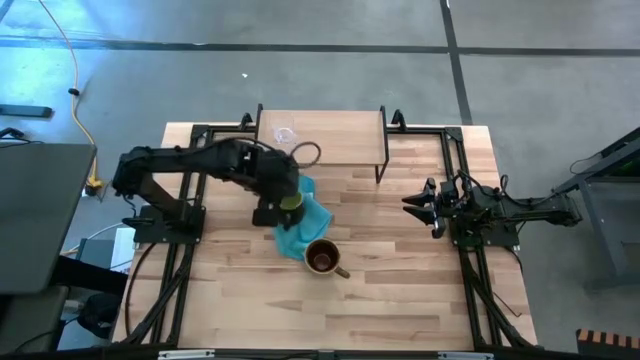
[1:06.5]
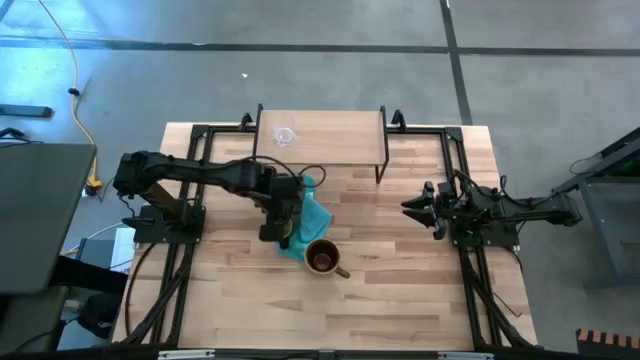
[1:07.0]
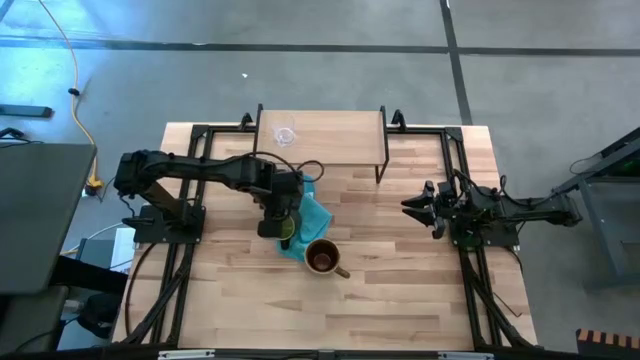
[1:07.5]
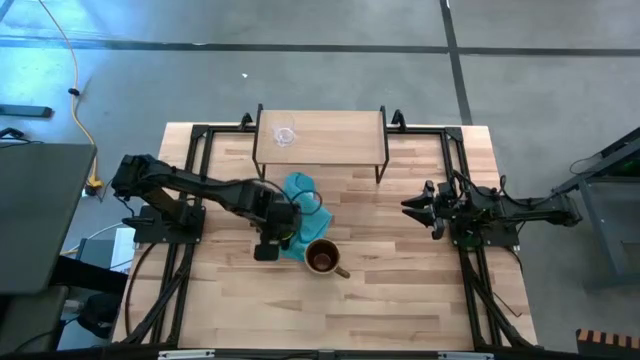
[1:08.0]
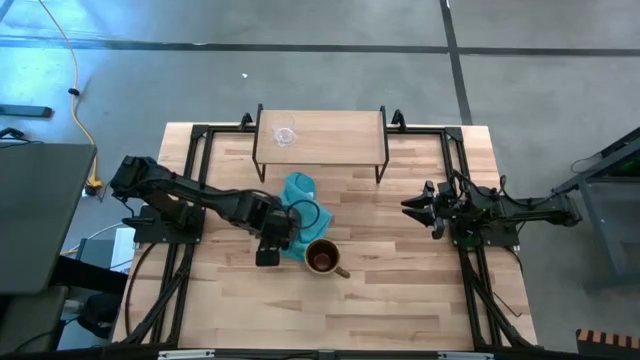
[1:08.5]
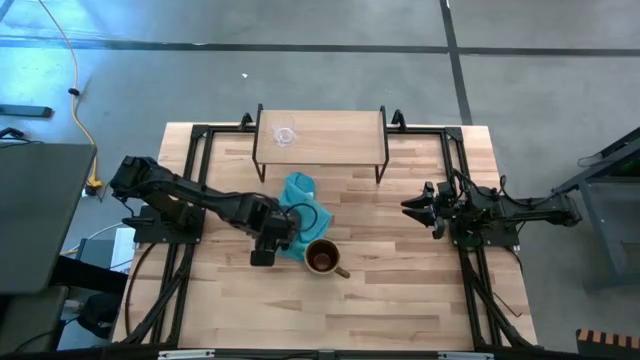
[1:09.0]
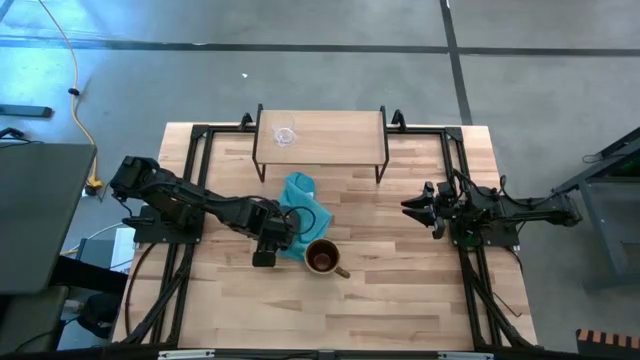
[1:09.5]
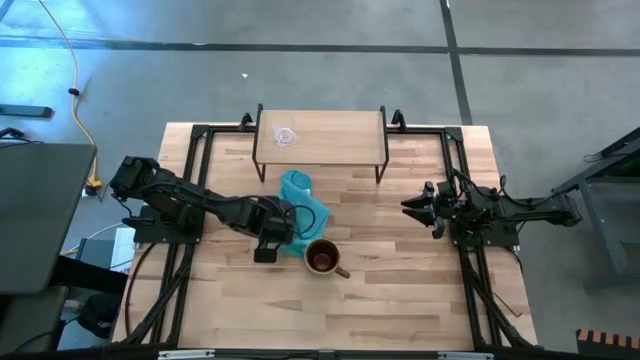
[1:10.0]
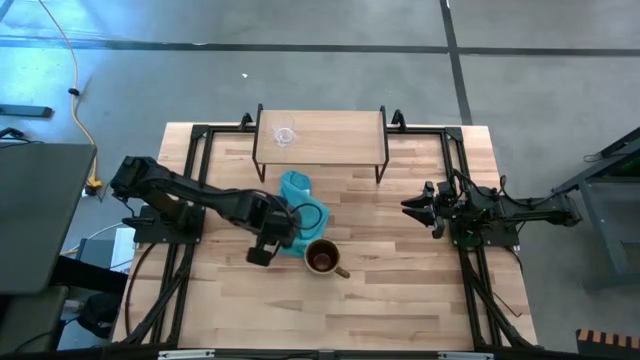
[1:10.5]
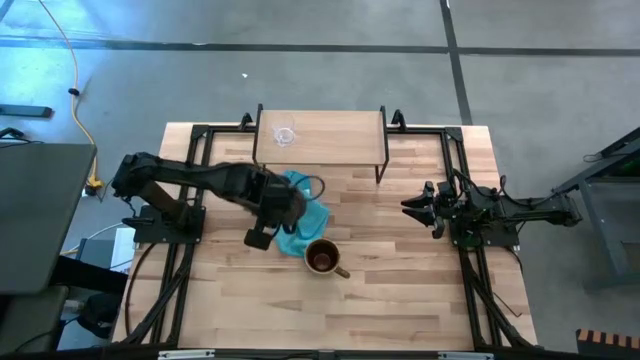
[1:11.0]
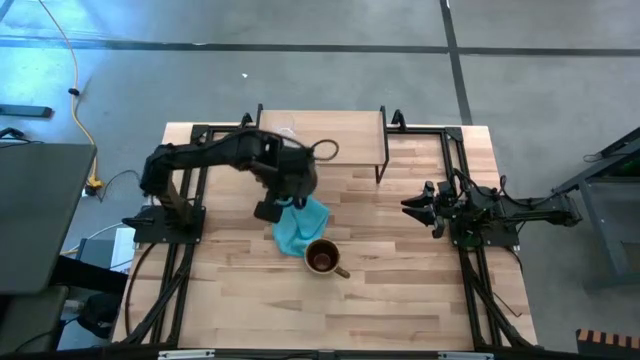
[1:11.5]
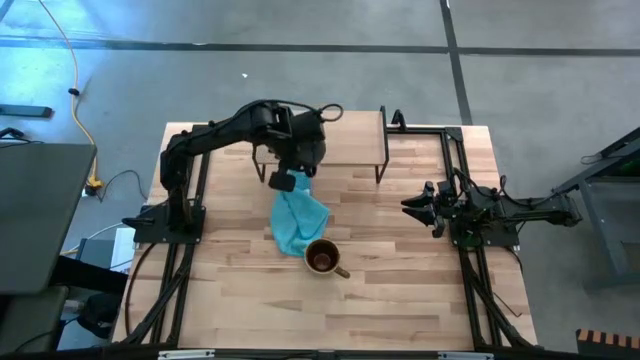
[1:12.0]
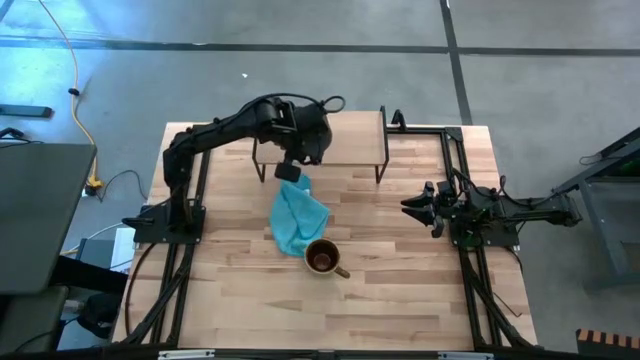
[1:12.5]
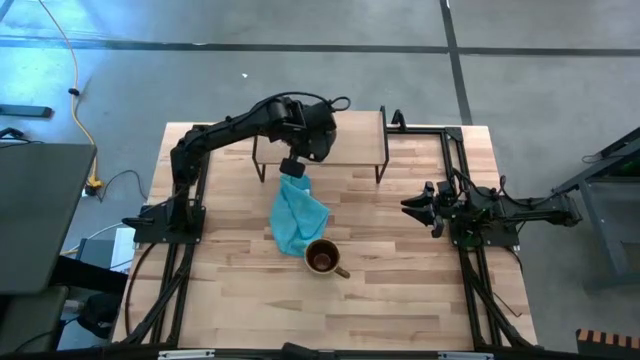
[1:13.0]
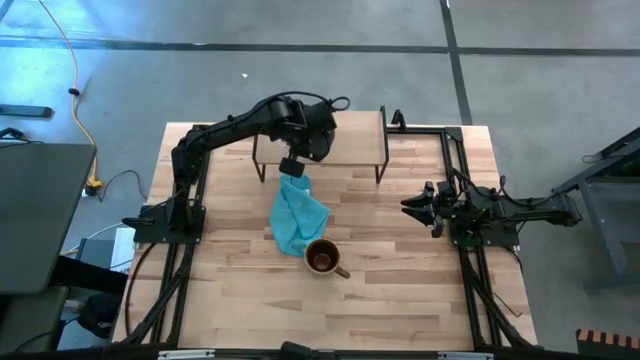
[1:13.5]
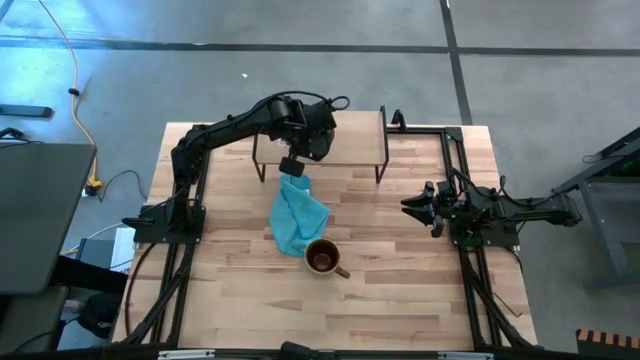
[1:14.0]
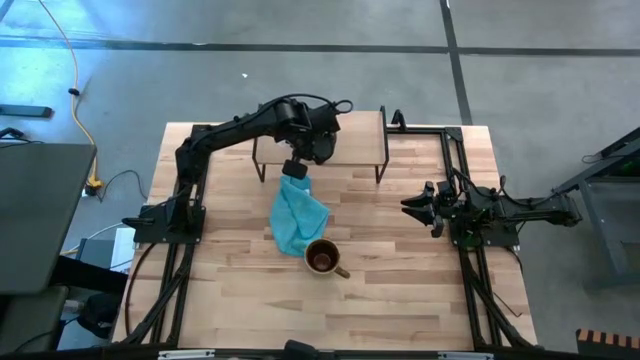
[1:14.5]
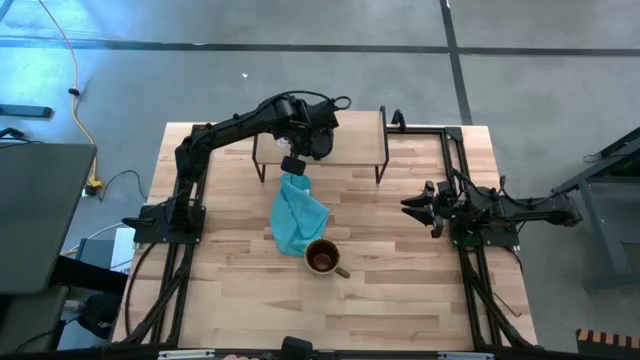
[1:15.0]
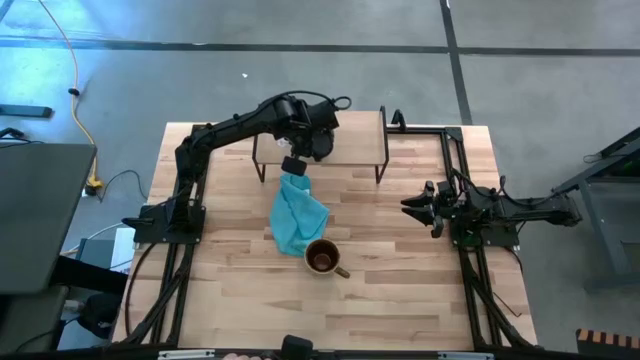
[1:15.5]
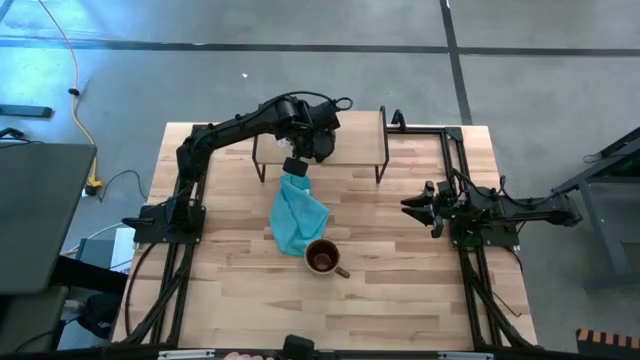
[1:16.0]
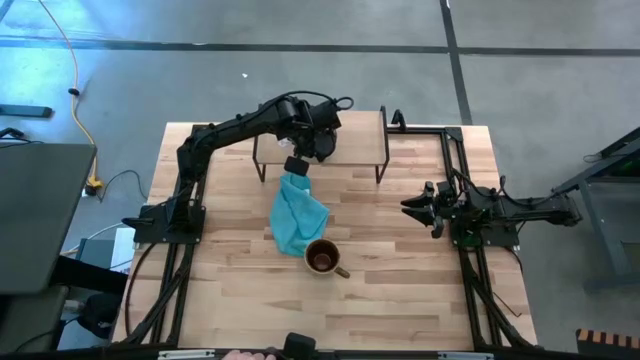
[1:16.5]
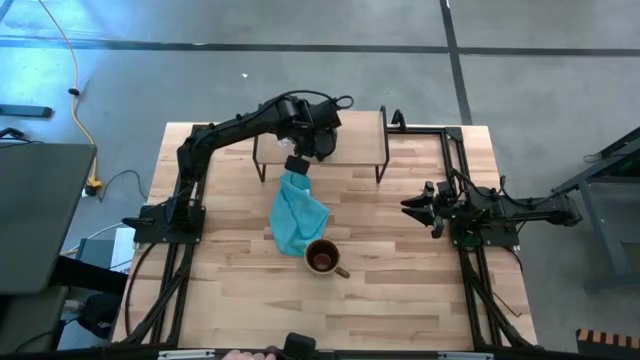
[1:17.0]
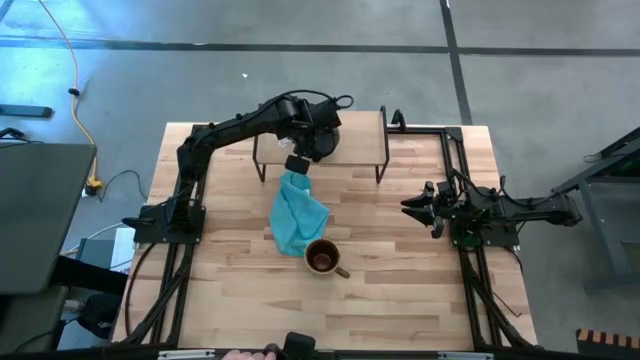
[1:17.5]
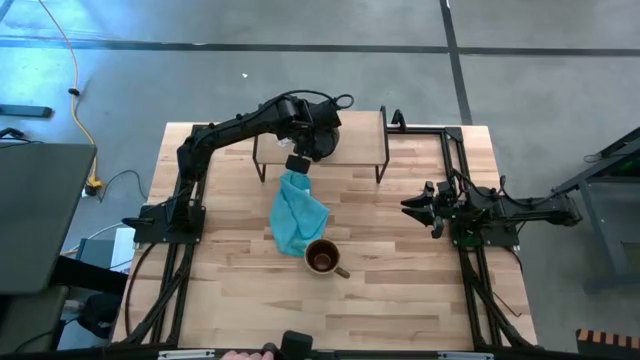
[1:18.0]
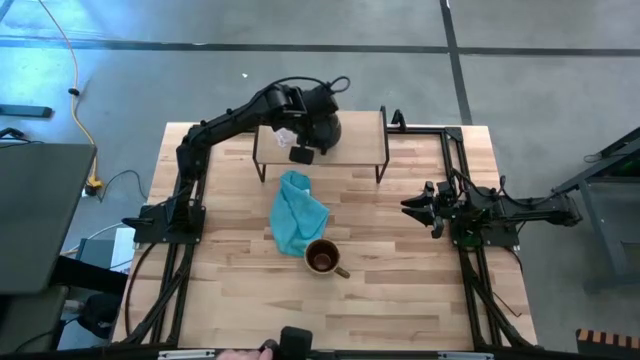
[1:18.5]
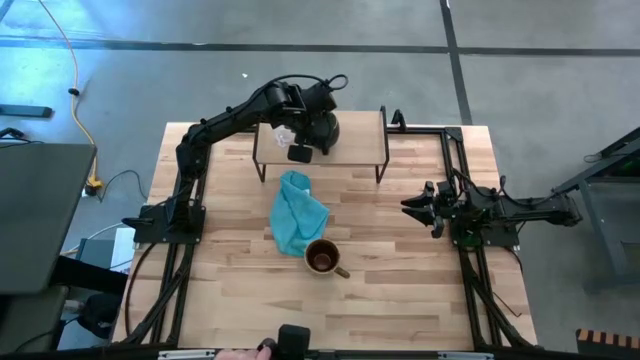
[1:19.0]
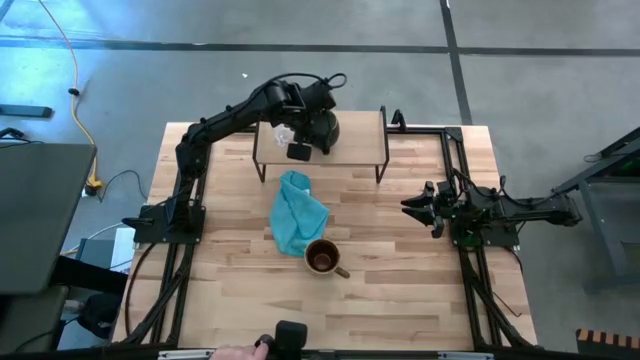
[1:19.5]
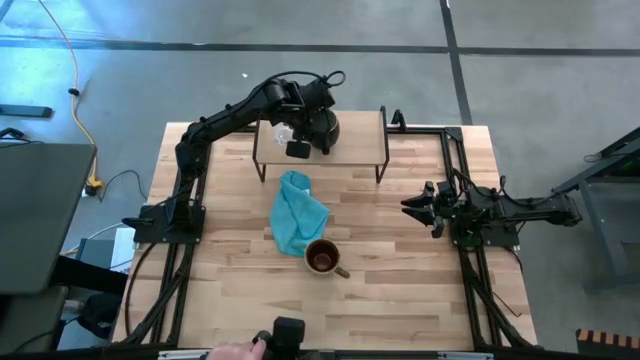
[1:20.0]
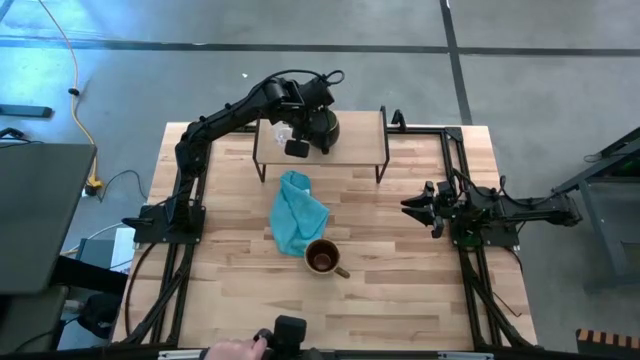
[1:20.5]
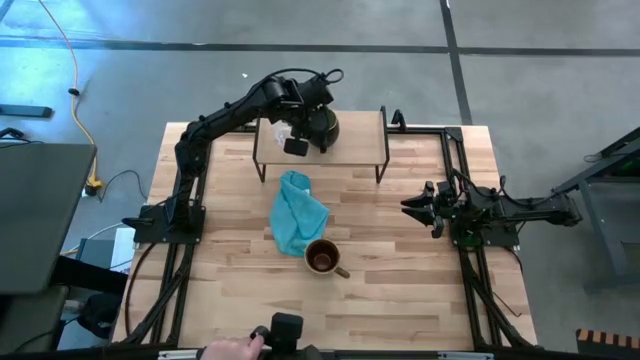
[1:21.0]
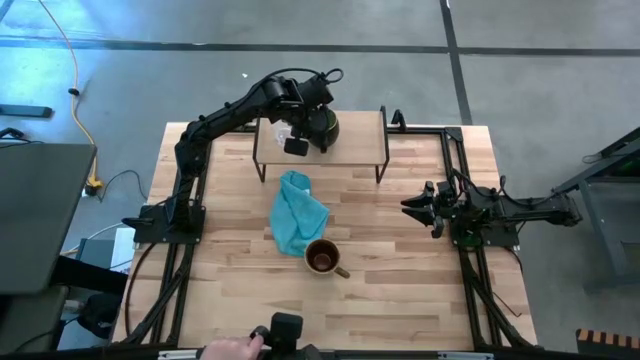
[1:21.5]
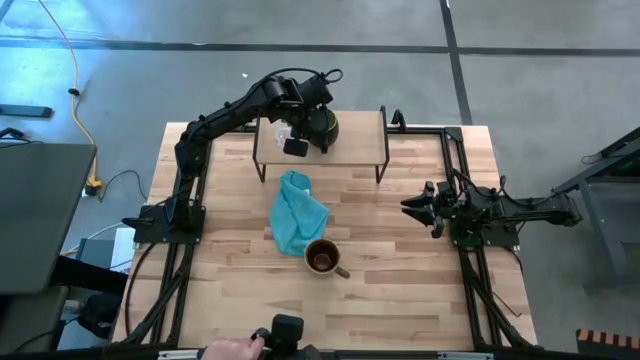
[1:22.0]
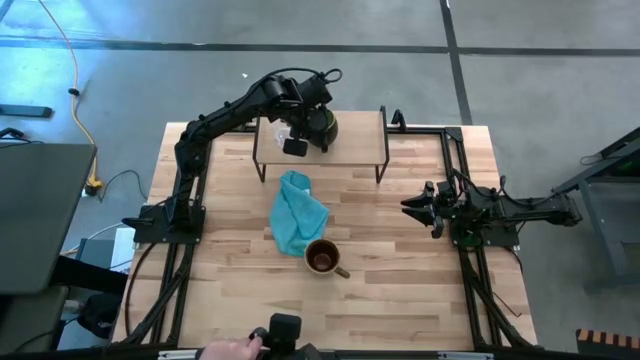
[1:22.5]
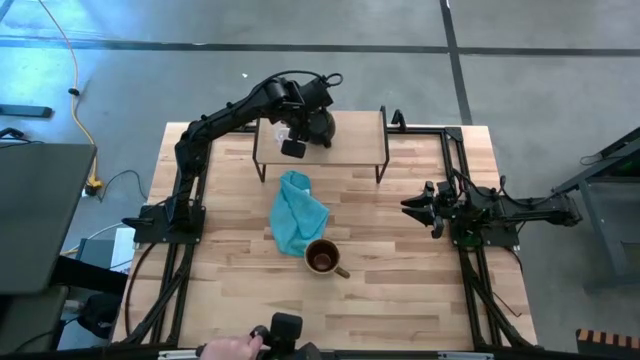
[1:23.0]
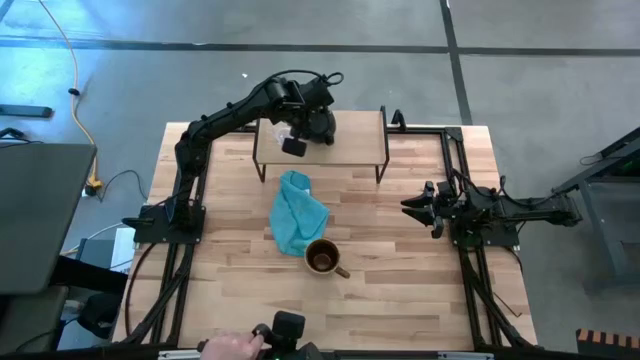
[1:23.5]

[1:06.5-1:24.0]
Task: Stack small to large cups/mugs on shelf
Put the green mug on the shelf

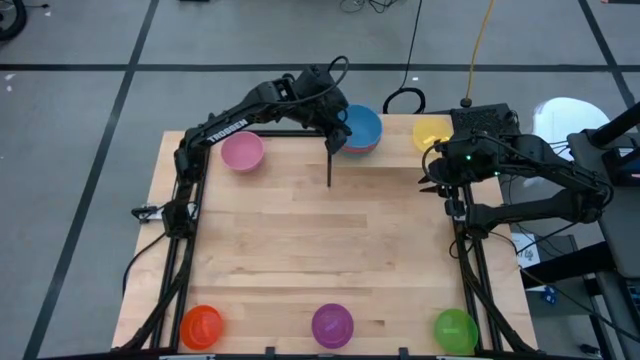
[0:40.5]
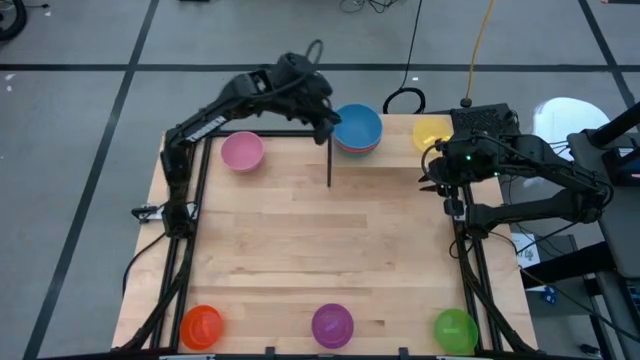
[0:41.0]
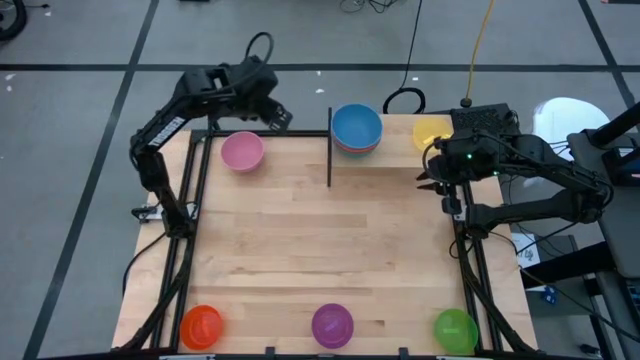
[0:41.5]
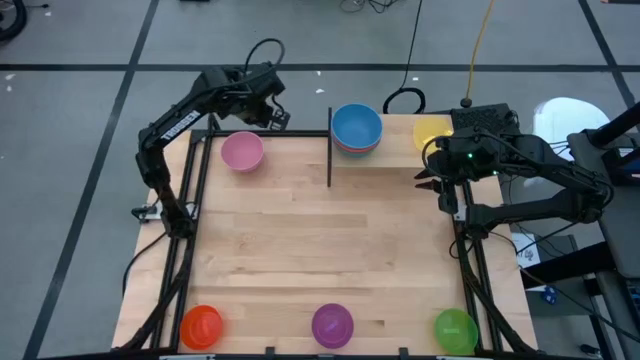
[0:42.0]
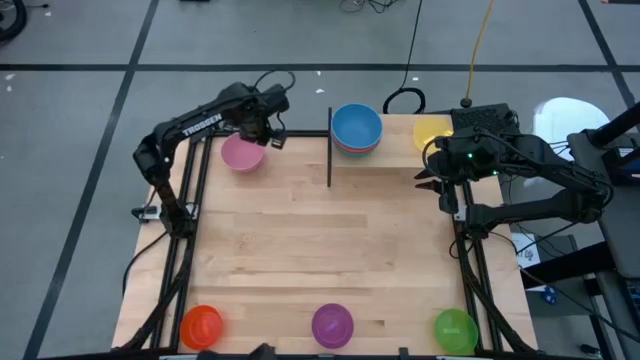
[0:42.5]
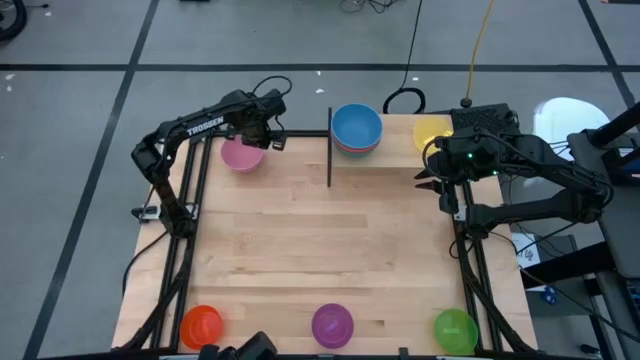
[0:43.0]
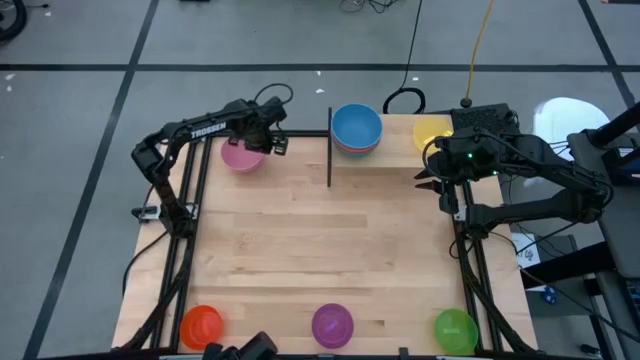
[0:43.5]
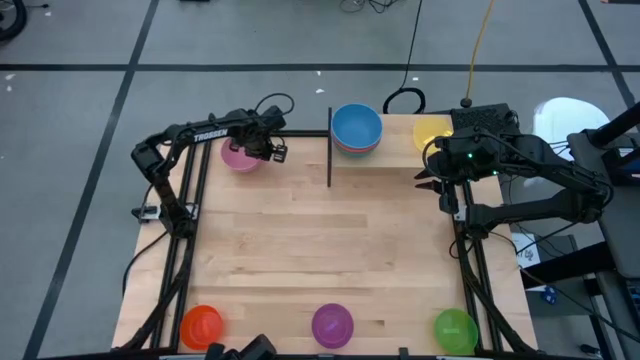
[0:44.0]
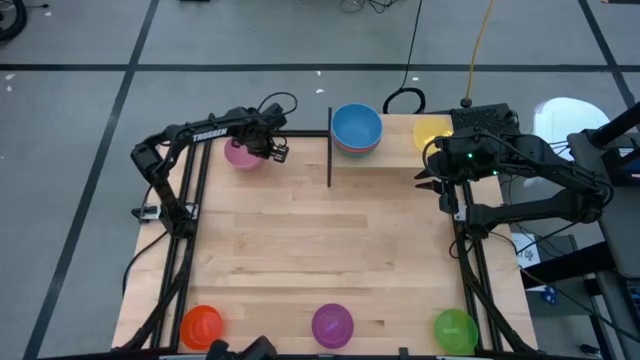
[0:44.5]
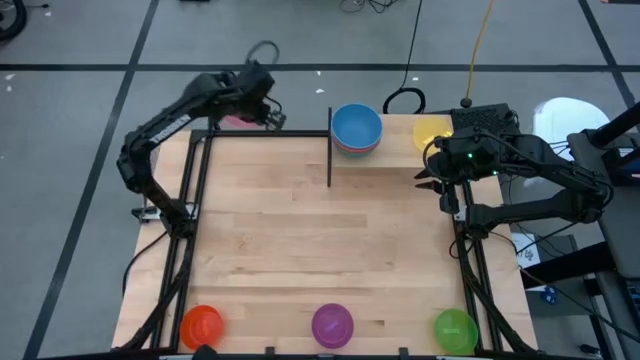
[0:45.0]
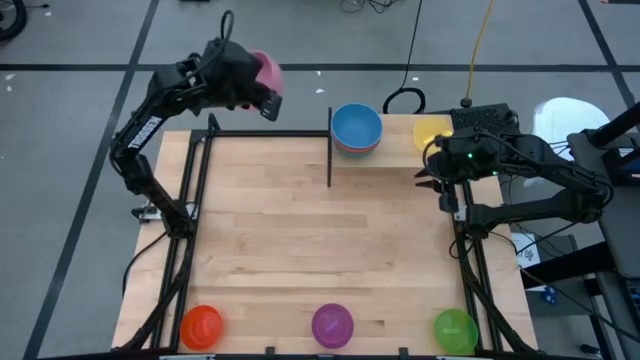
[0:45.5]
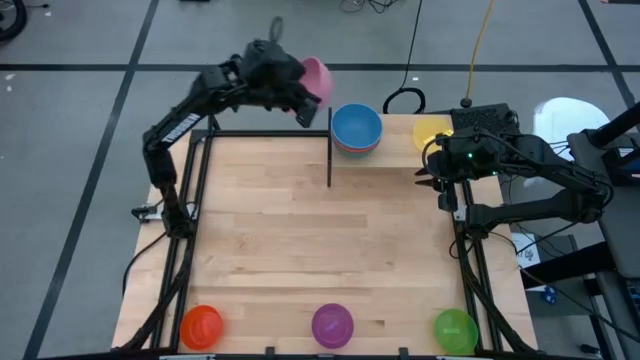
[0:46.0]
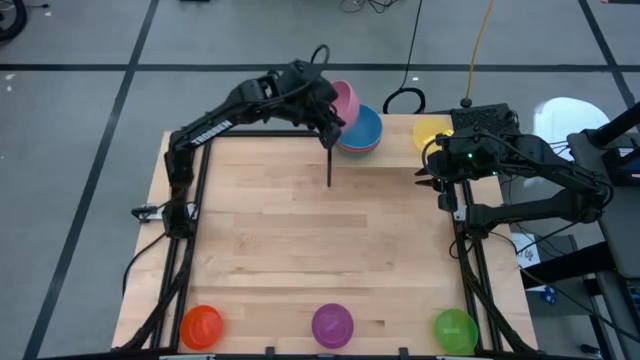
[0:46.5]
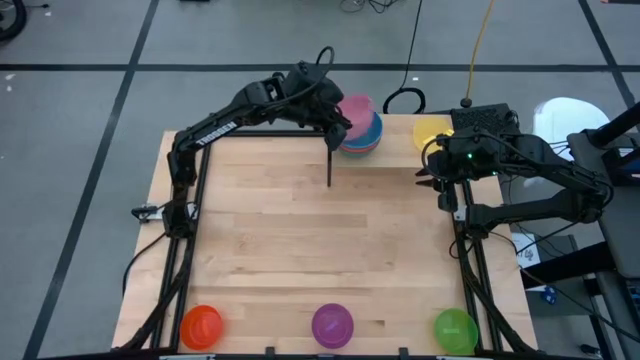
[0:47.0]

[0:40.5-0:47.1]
Task: Place and stack bowls onto a shelf
Stack the pink bowl on top of the blue bowl on the shelf
